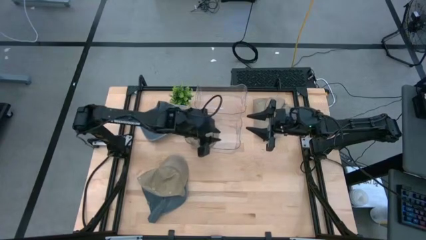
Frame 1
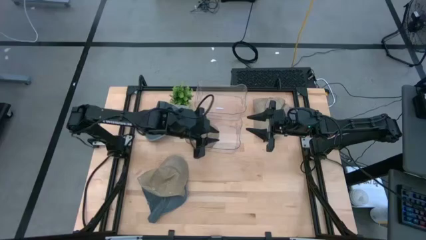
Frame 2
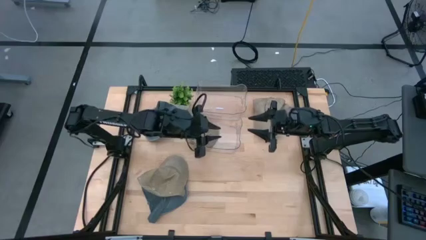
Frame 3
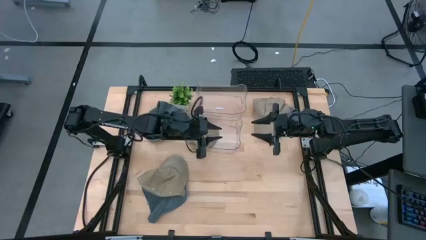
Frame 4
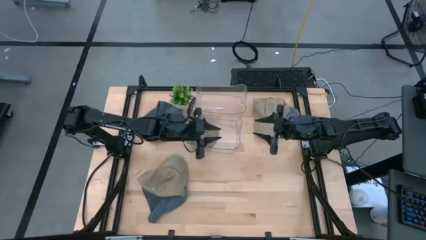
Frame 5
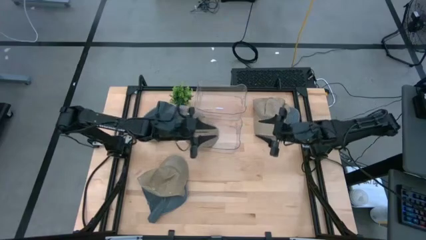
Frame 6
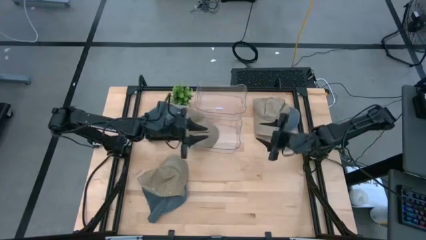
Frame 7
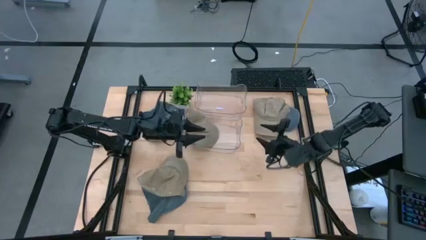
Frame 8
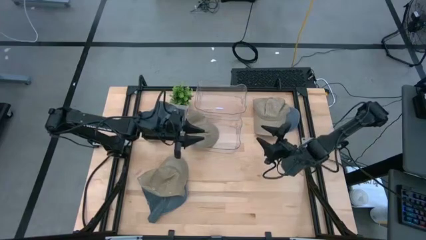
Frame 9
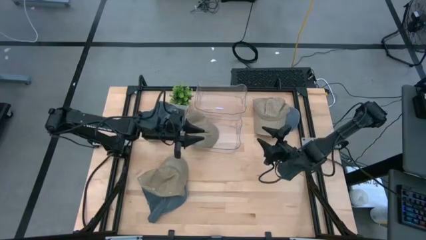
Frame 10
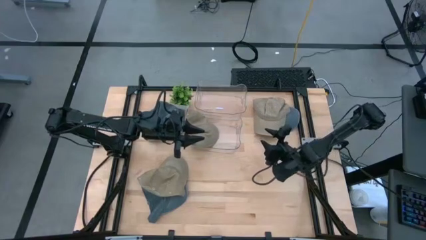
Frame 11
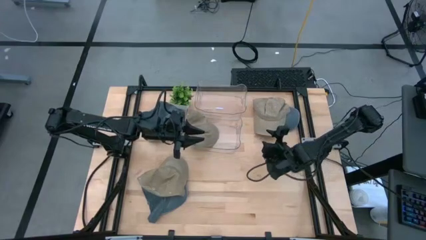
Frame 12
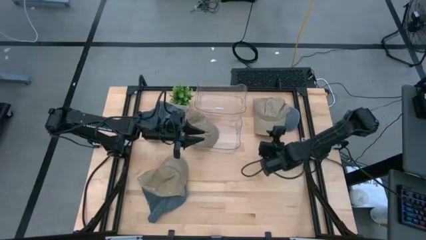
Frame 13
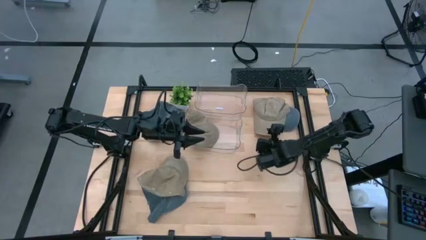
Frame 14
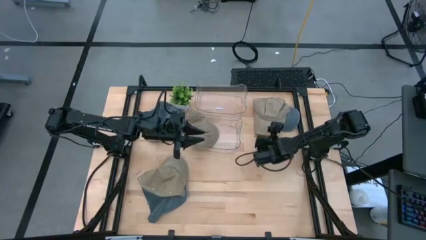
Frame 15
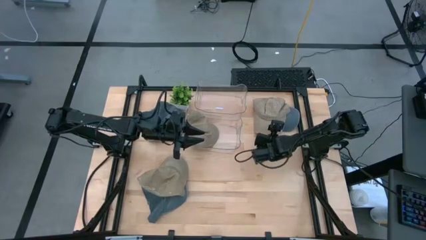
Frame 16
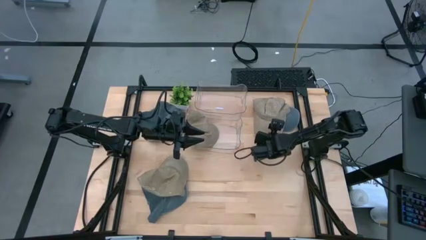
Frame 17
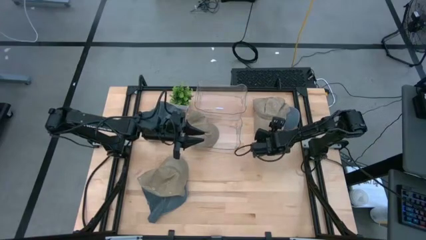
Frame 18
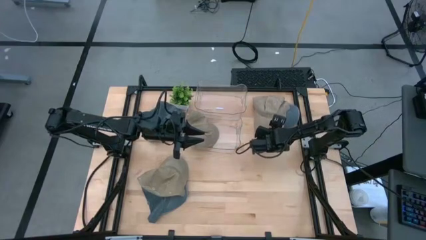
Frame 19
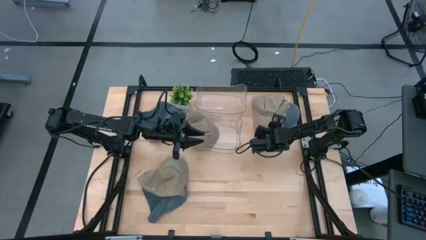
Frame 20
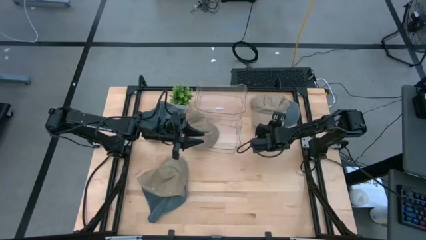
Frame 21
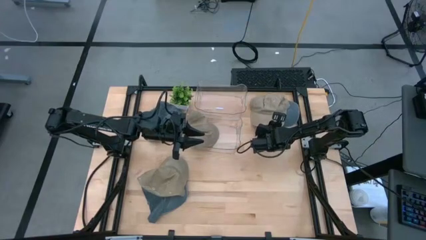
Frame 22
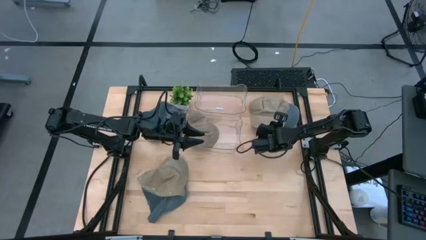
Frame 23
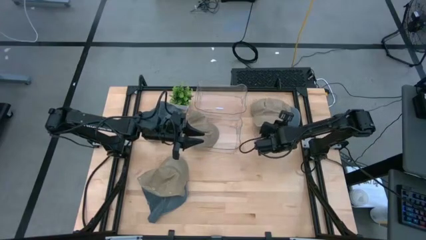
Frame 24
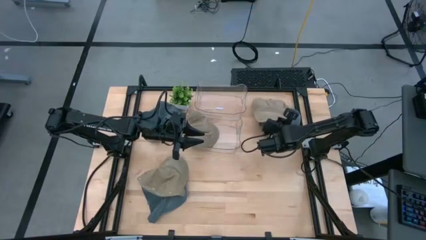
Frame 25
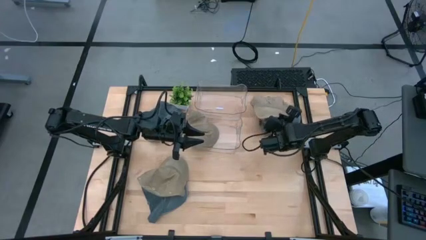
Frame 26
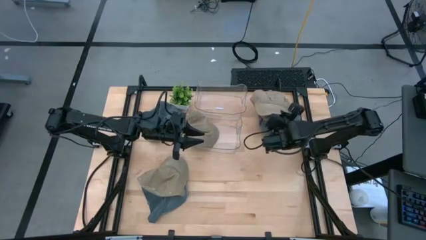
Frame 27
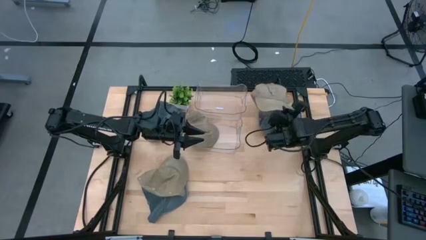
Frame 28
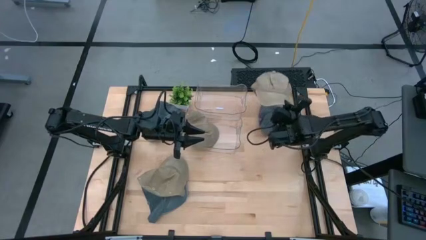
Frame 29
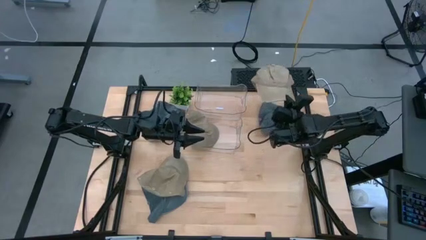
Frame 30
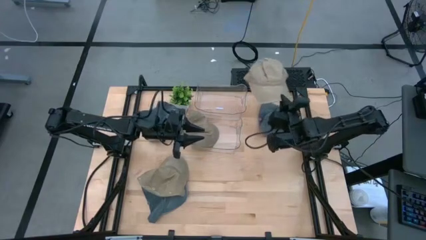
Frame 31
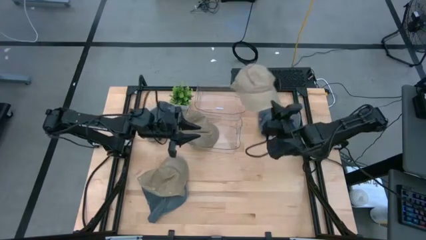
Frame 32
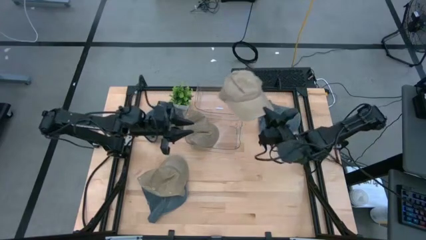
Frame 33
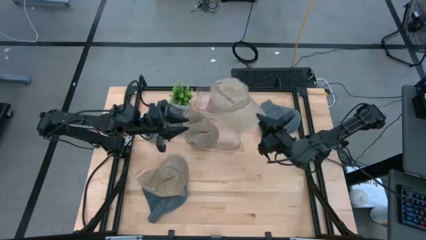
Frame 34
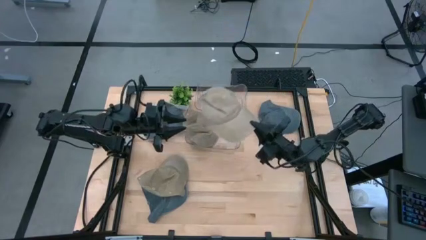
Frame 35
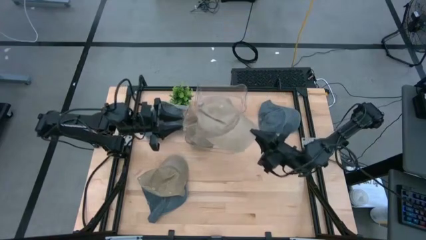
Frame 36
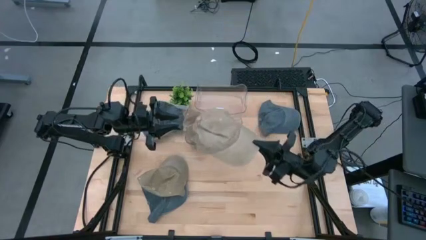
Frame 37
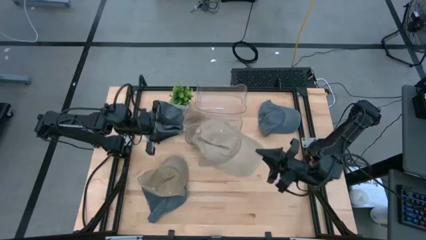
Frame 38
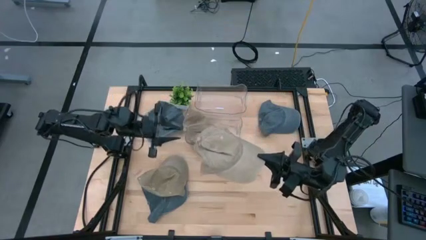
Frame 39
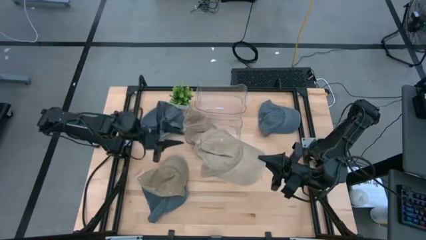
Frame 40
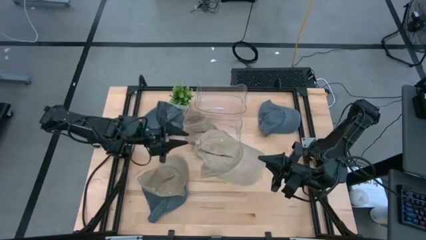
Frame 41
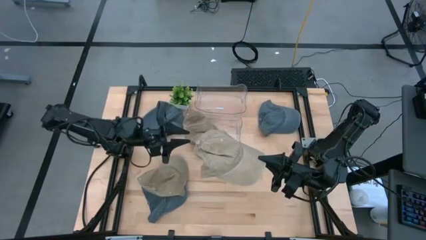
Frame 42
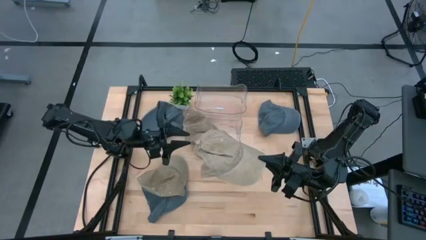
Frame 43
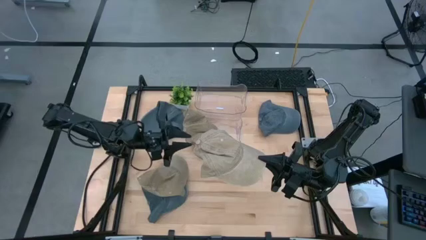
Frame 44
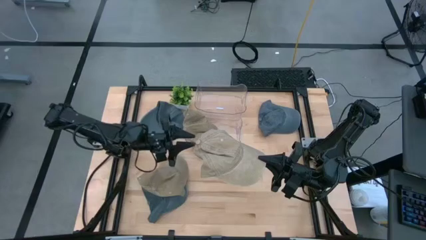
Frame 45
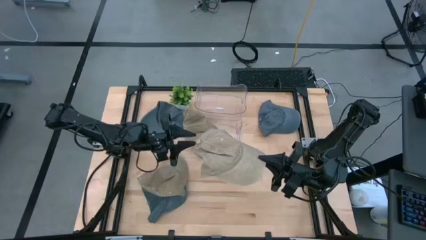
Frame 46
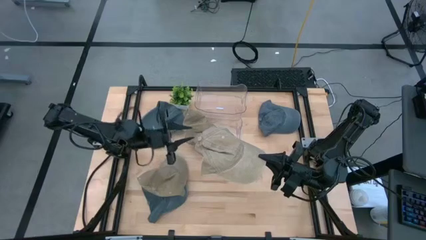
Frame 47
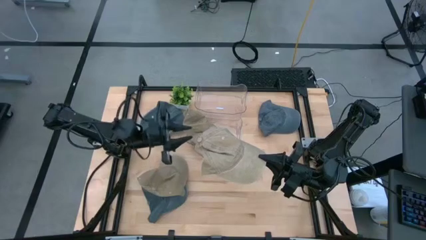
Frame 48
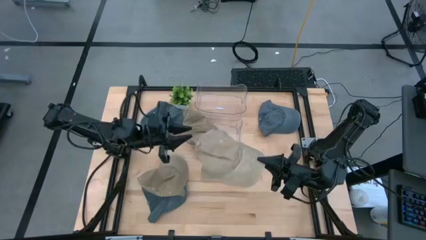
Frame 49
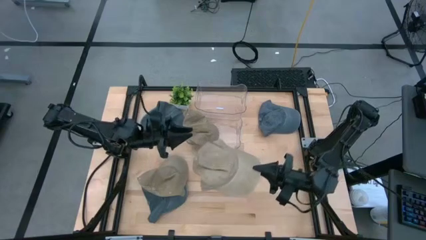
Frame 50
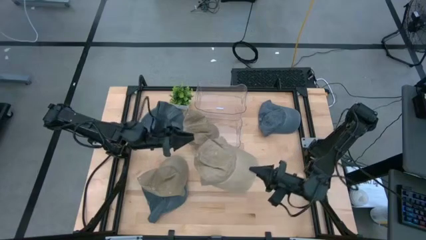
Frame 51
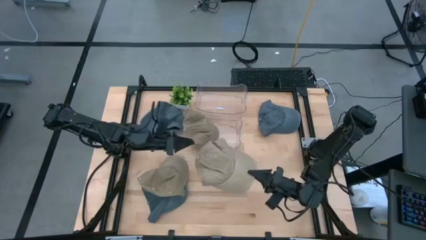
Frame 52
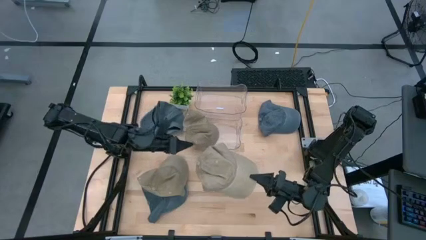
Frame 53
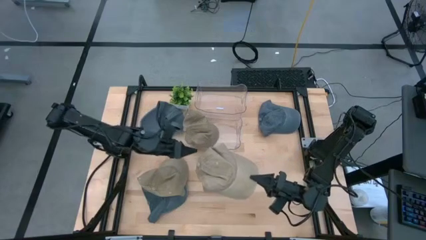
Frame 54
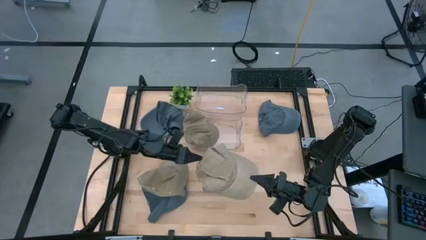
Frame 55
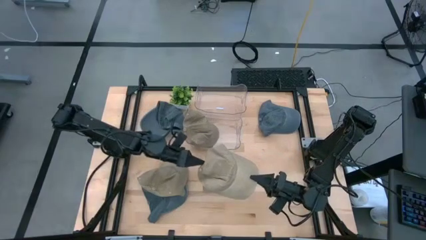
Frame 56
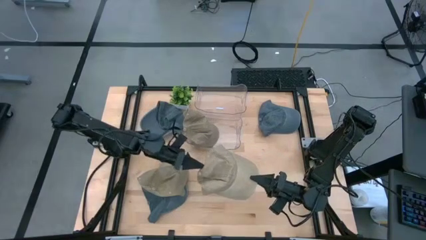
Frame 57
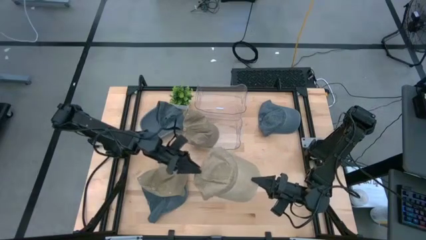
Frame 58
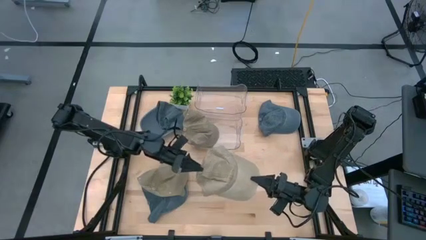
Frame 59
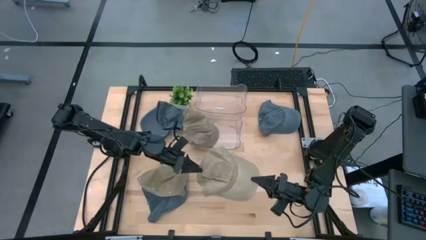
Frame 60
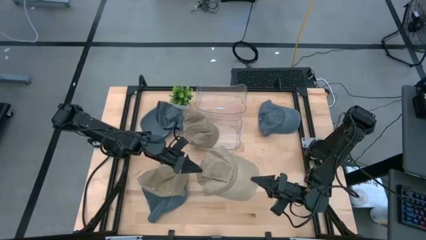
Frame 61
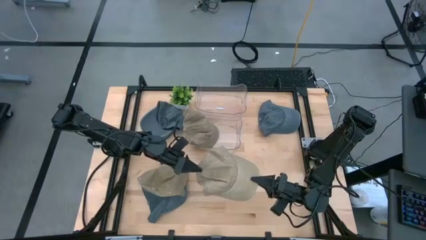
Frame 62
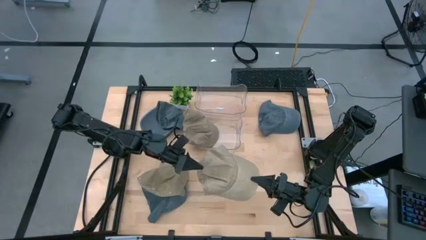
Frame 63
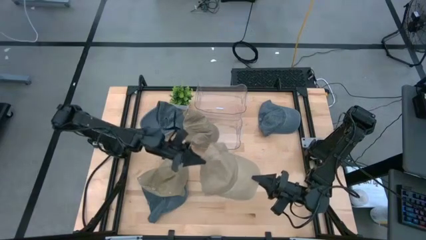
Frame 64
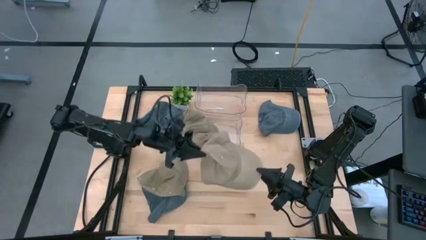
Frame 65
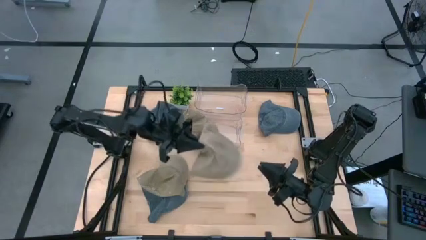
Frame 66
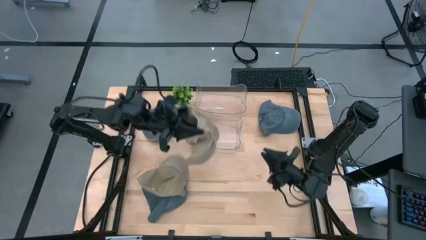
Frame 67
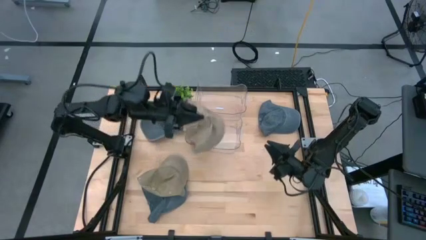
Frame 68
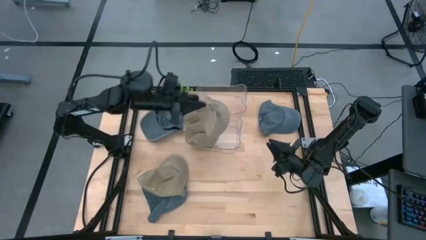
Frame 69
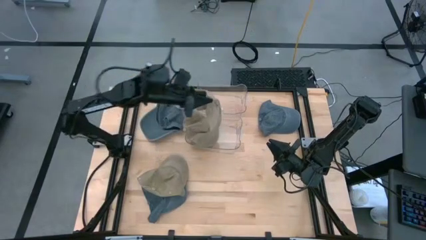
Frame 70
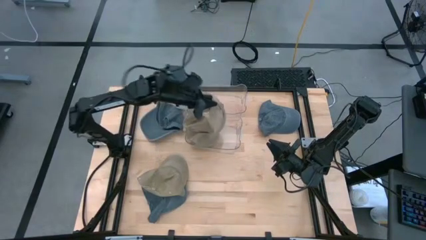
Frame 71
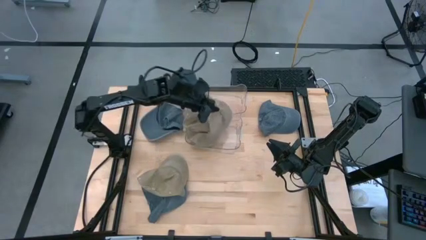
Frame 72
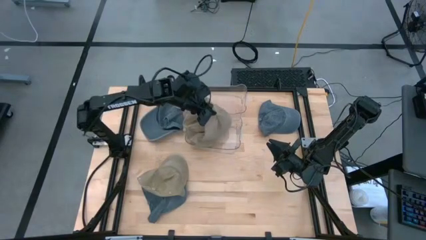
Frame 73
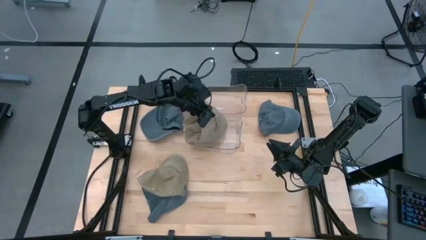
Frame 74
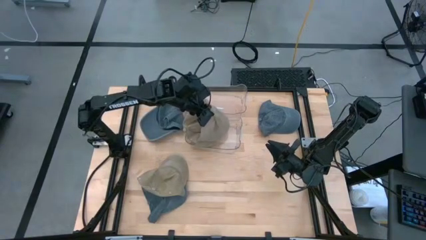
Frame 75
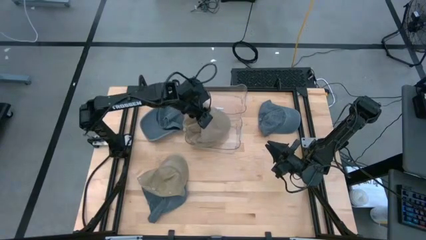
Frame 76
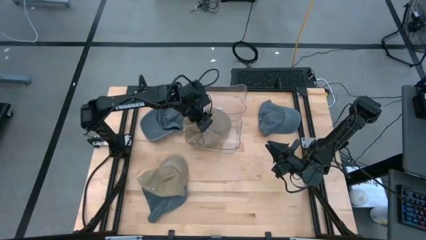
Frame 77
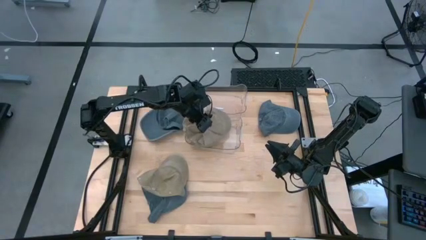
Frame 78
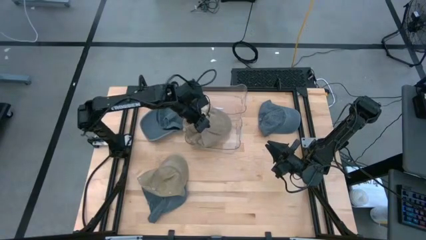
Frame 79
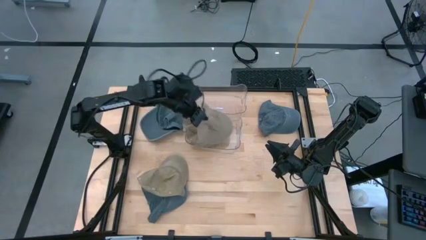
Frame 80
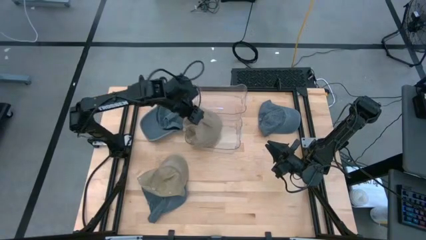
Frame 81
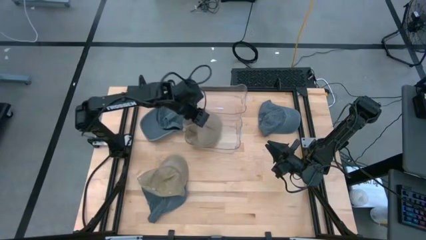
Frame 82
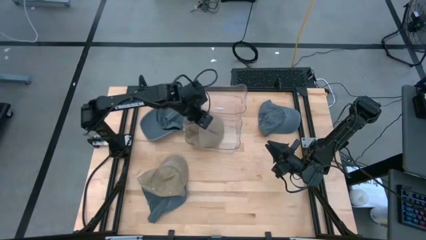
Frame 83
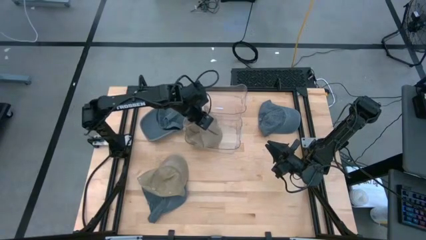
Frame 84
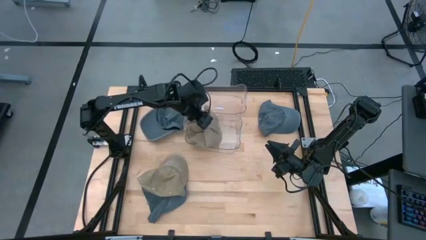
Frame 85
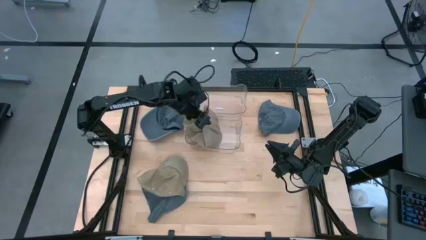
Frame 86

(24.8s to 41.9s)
Task: Pick & Place hat
Put the top brown cap into the bottom transparent bin
